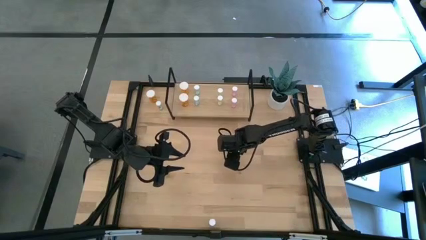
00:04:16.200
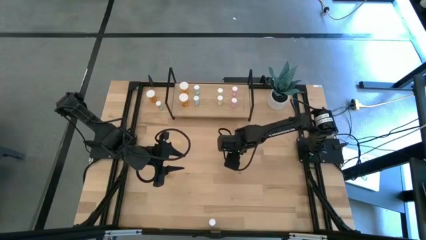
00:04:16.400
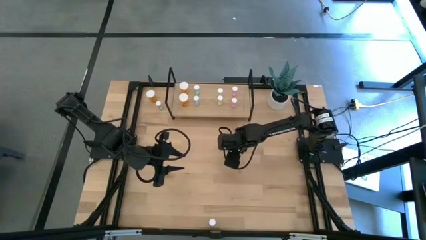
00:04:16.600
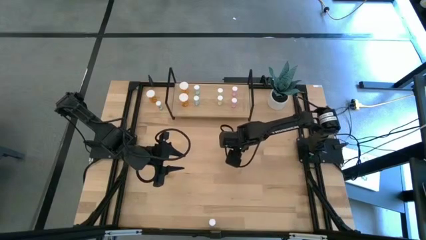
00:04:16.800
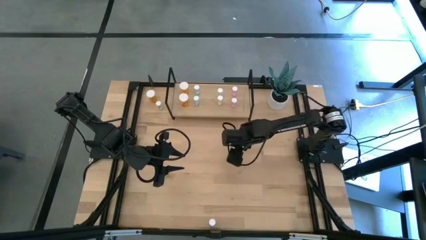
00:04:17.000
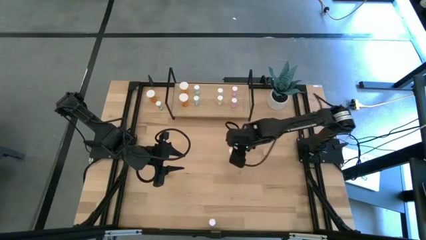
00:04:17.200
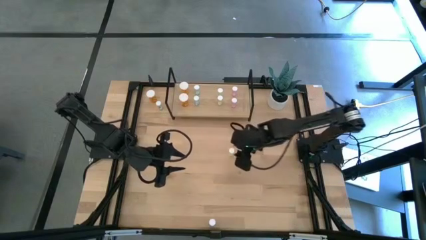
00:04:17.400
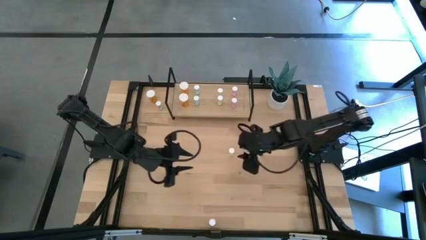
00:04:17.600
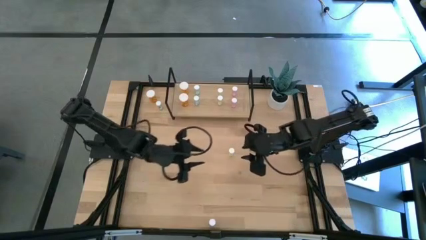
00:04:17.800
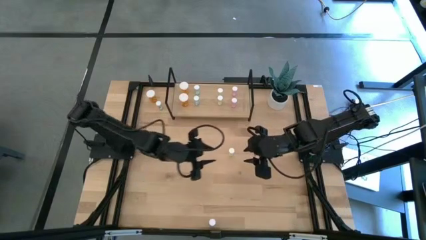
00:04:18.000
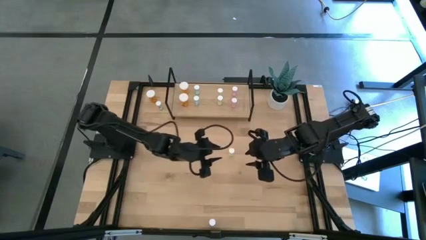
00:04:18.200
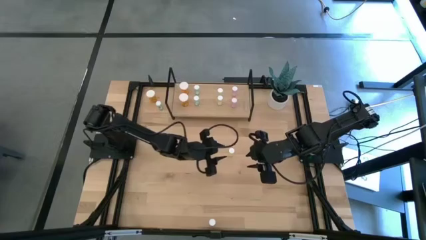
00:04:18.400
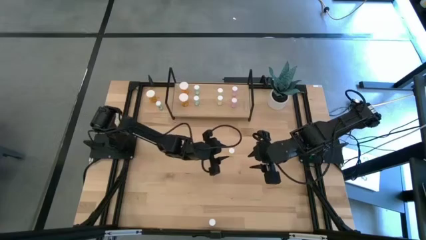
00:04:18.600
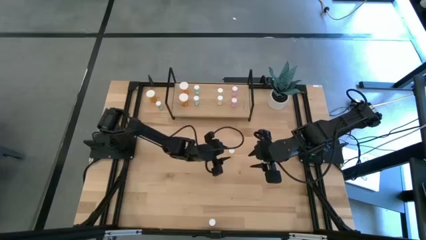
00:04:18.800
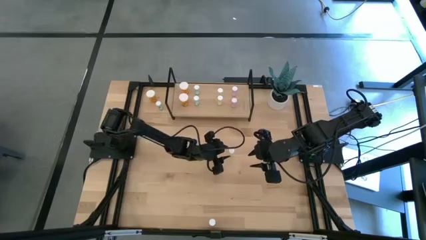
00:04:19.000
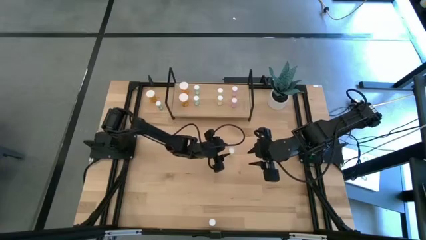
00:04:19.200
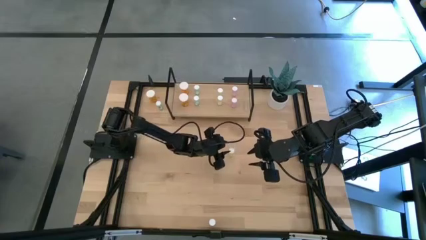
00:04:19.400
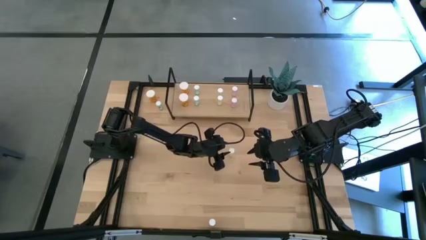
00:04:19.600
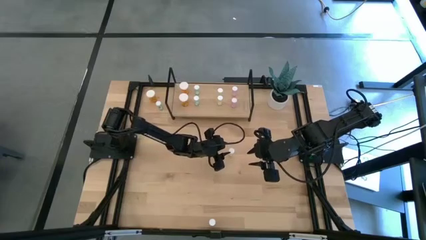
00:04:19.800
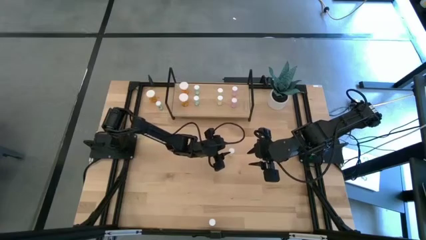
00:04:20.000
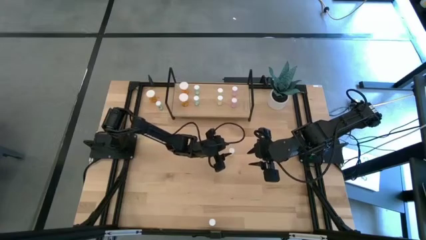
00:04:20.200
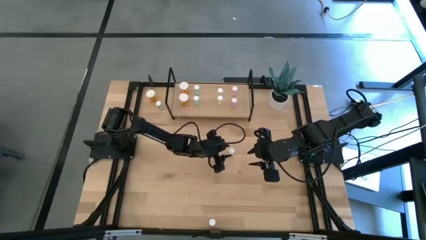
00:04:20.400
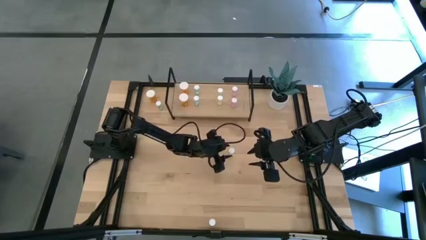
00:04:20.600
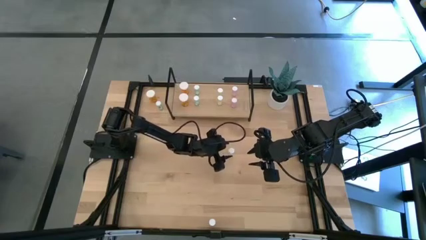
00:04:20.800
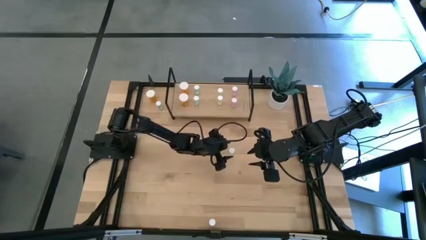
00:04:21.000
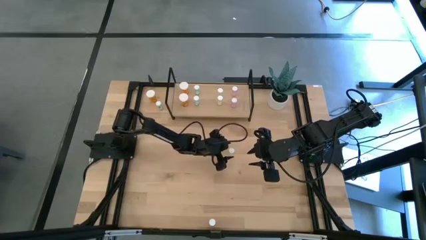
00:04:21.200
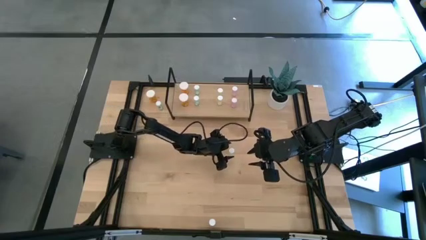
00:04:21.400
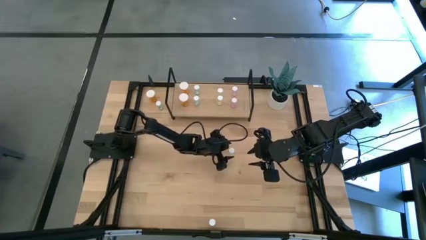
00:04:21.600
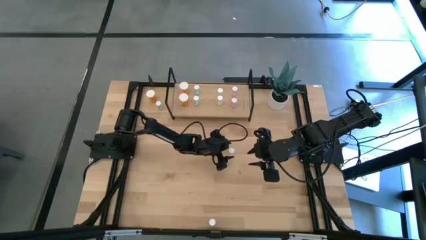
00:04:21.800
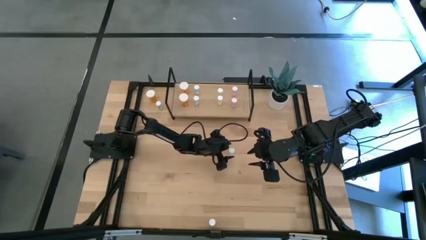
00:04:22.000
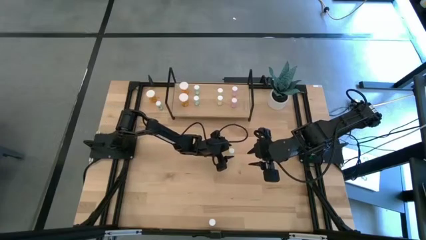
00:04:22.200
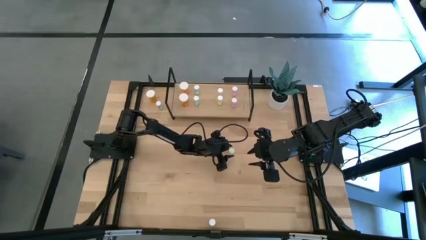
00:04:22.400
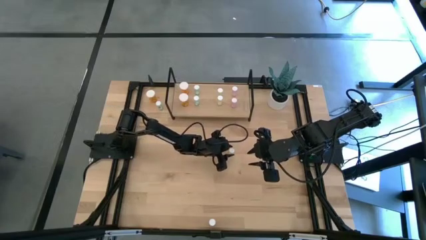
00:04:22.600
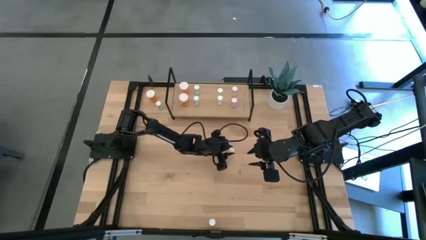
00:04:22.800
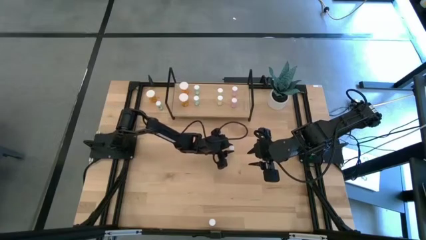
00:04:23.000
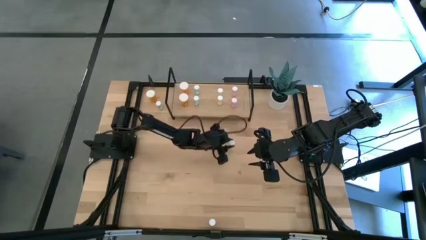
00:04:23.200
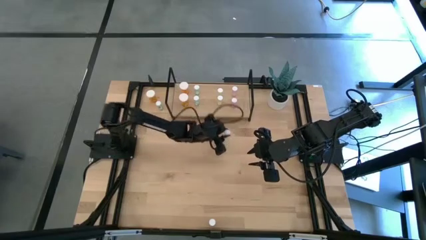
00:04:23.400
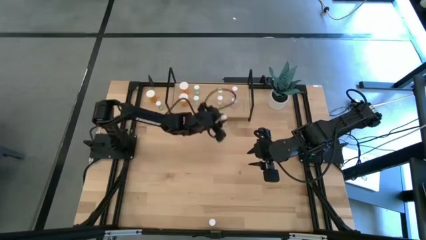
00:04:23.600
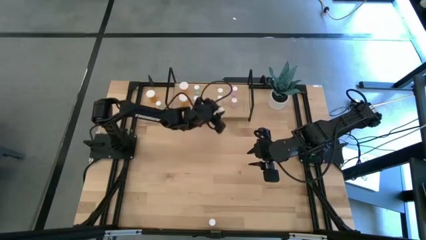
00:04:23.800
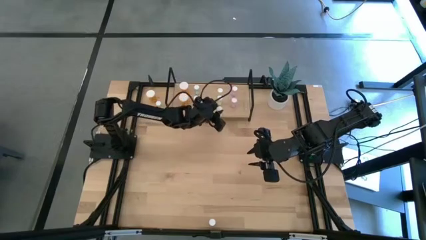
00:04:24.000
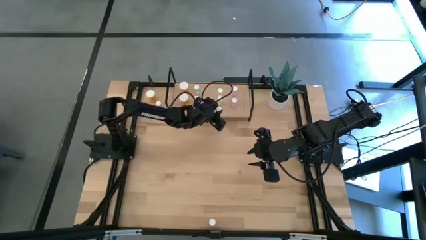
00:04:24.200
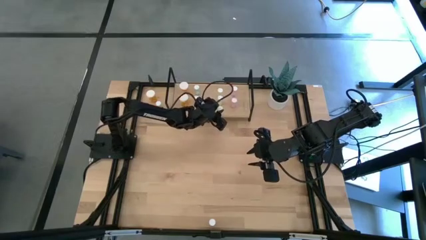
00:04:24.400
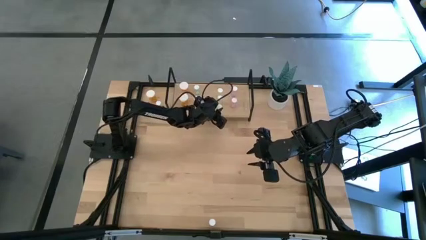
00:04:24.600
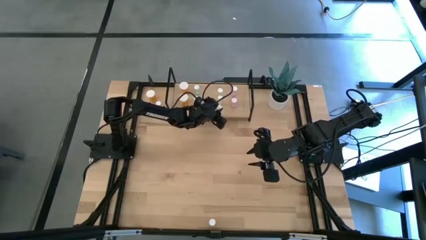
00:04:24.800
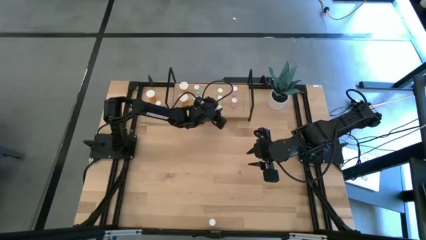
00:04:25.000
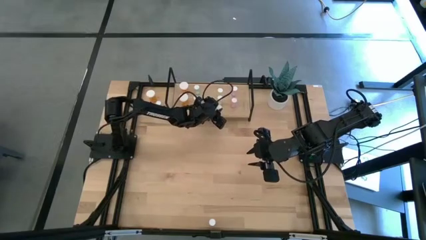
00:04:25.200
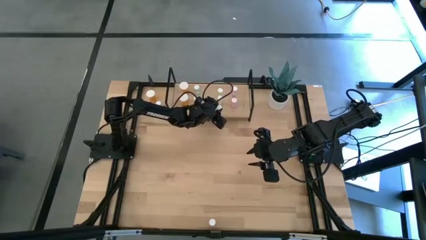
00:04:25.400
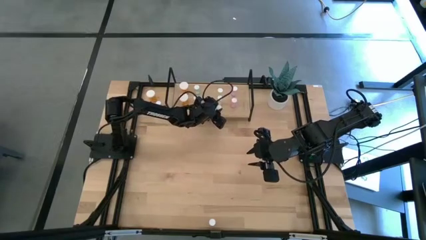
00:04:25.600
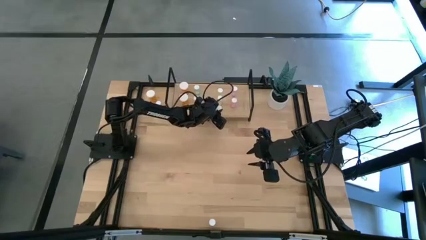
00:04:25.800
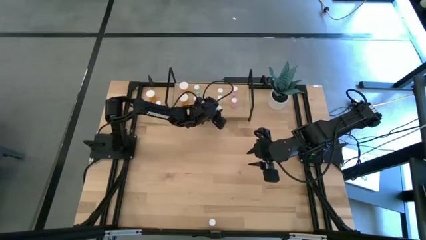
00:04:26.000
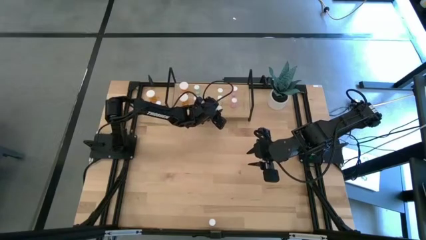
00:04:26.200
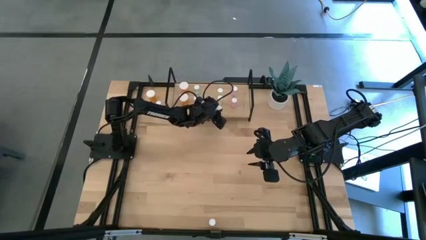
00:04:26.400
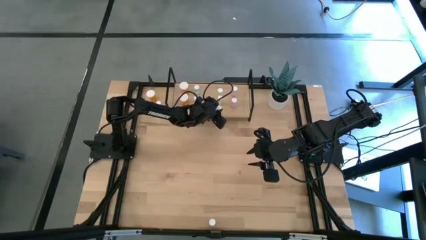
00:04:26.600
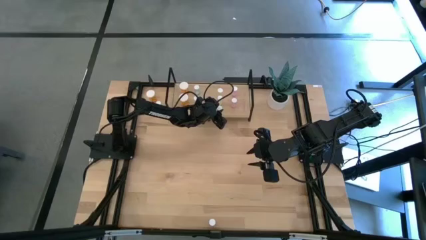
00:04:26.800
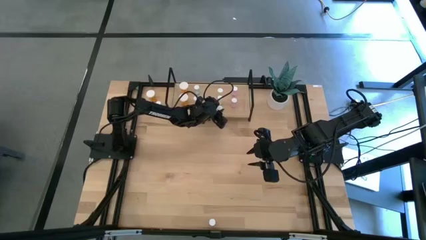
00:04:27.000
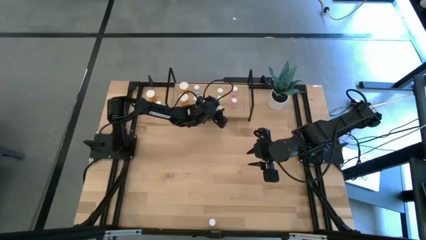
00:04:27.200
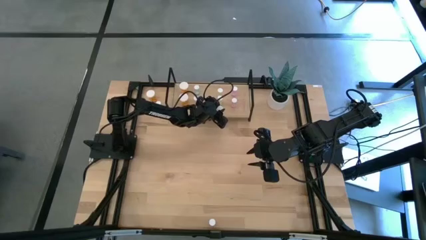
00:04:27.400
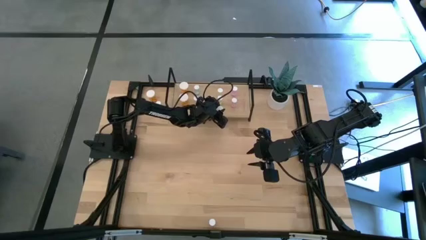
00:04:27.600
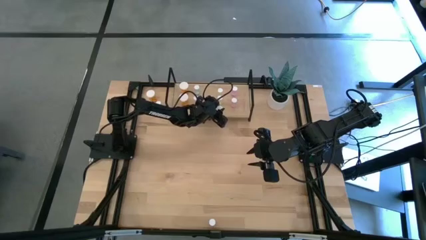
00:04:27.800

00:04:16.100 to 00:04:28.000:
Task: Pick and place medicine bottles onto shelf by color
Put the yellow pill bottle on the shelf aligned with the other yellow pill bottles
